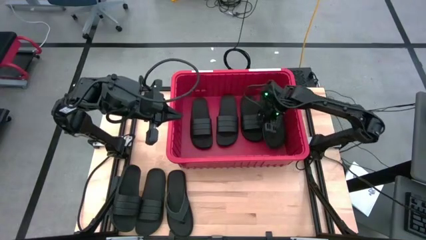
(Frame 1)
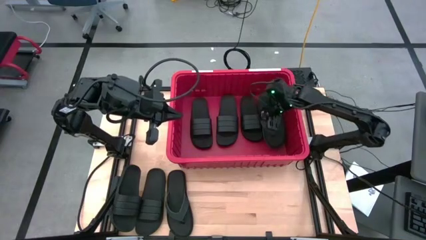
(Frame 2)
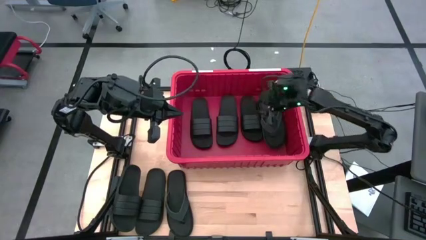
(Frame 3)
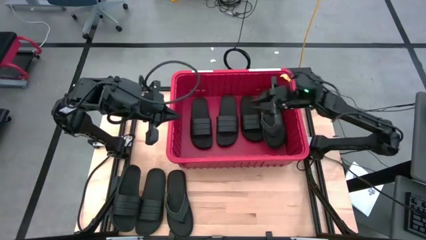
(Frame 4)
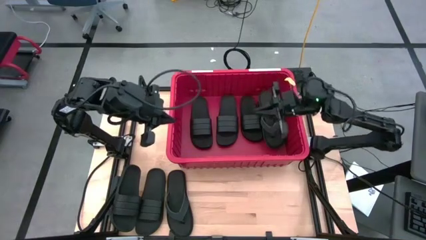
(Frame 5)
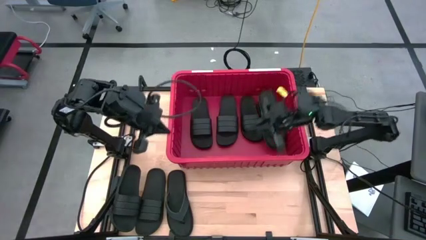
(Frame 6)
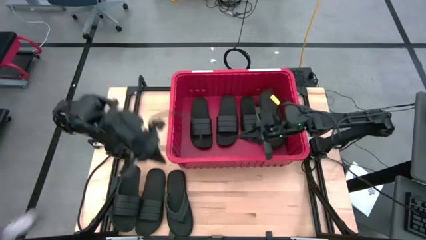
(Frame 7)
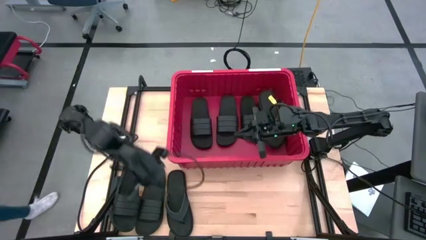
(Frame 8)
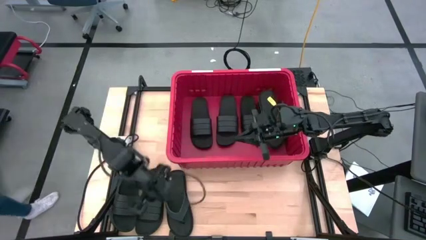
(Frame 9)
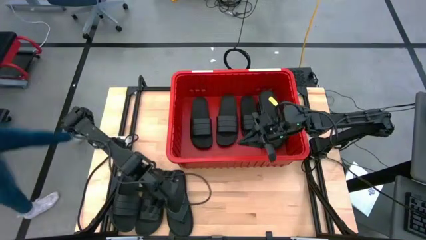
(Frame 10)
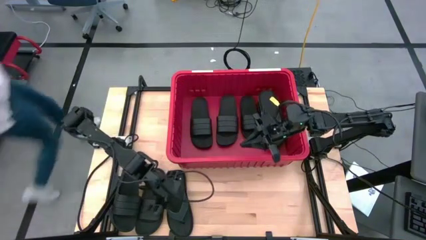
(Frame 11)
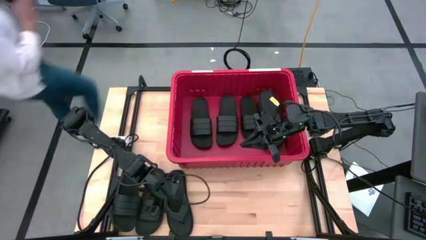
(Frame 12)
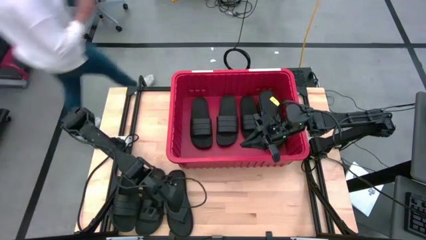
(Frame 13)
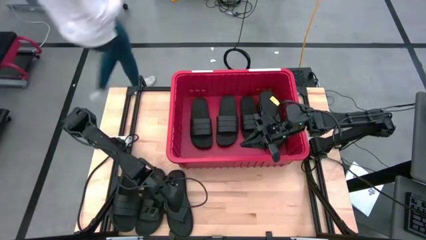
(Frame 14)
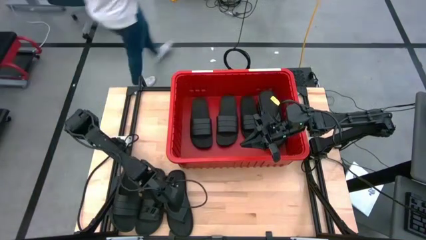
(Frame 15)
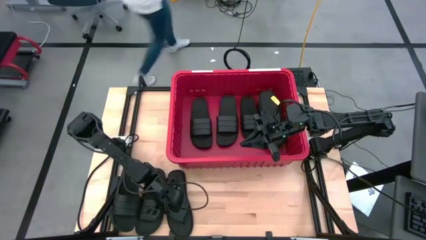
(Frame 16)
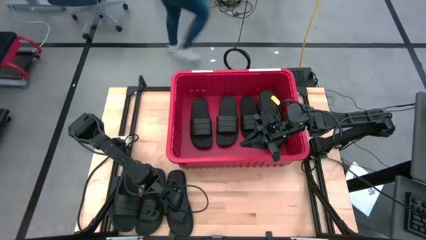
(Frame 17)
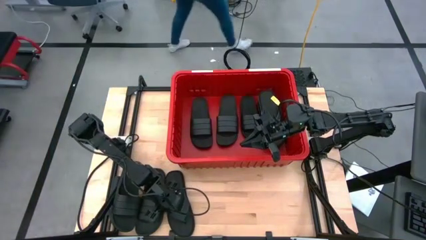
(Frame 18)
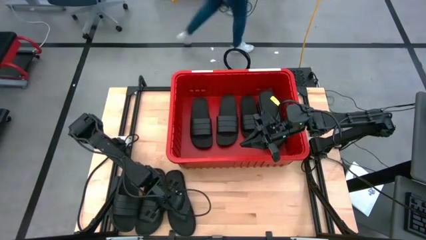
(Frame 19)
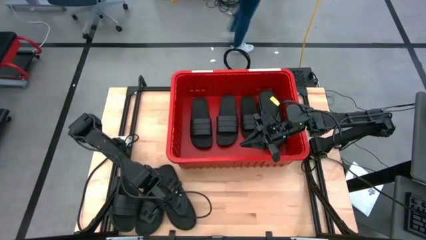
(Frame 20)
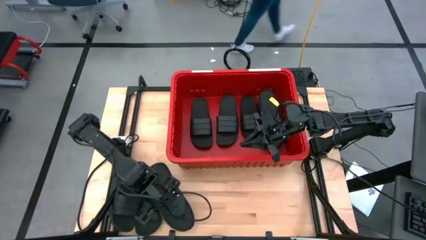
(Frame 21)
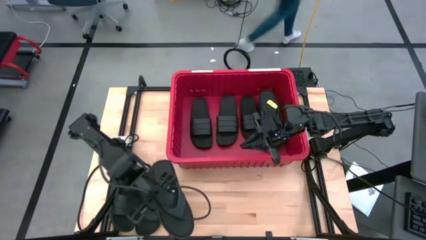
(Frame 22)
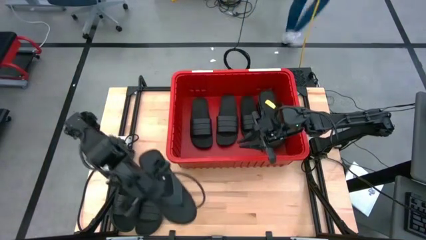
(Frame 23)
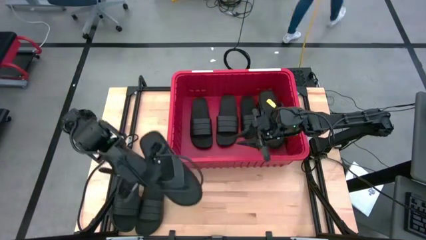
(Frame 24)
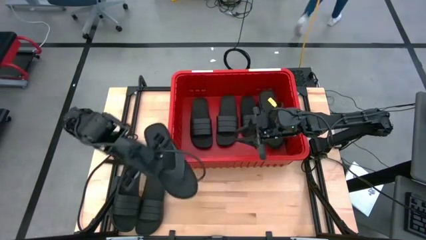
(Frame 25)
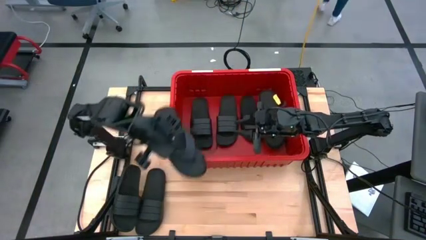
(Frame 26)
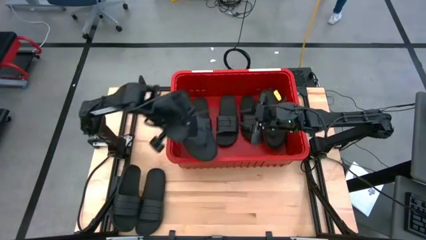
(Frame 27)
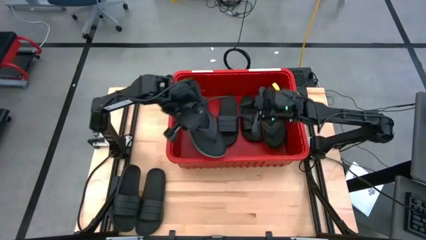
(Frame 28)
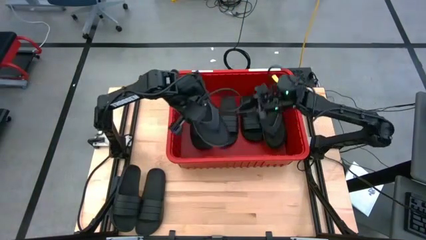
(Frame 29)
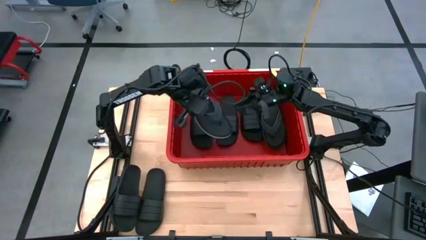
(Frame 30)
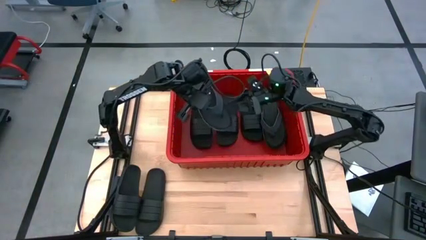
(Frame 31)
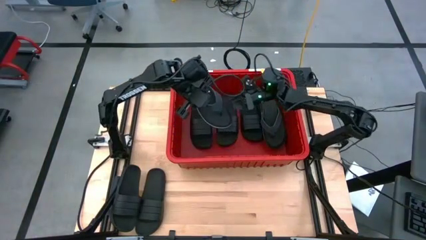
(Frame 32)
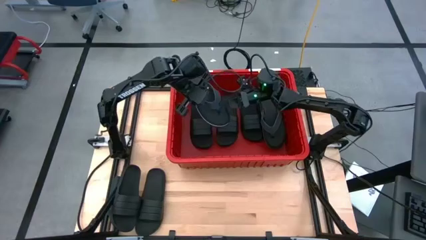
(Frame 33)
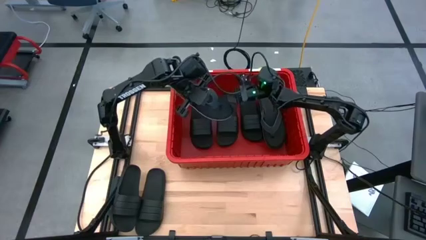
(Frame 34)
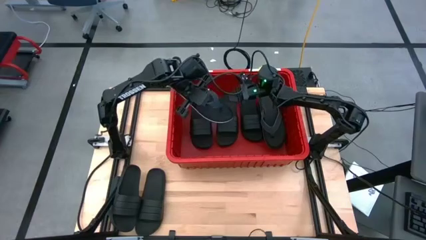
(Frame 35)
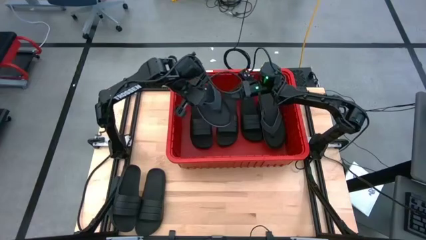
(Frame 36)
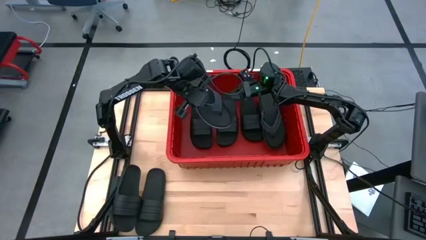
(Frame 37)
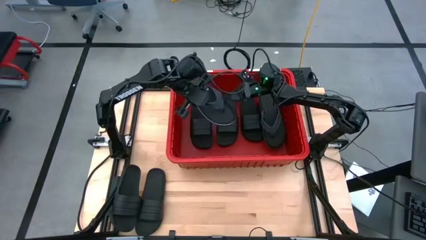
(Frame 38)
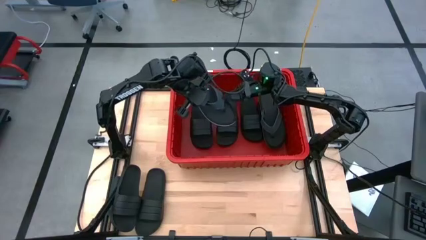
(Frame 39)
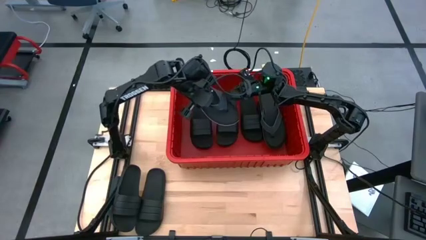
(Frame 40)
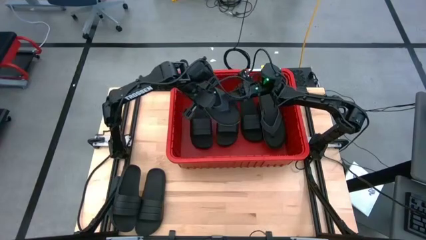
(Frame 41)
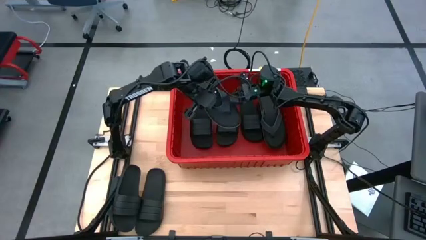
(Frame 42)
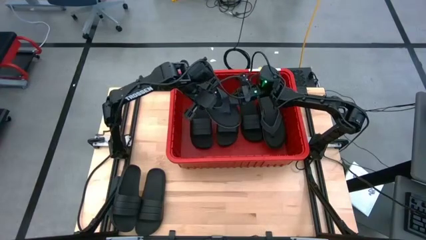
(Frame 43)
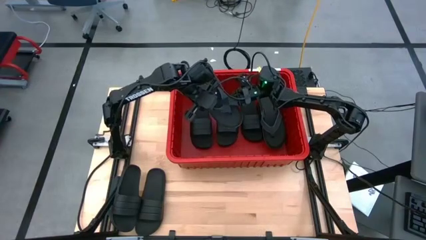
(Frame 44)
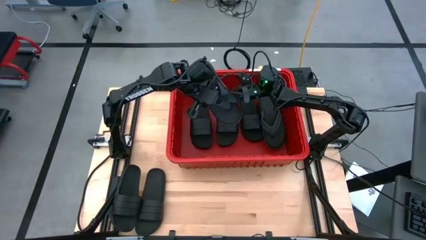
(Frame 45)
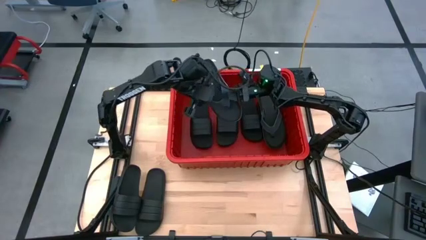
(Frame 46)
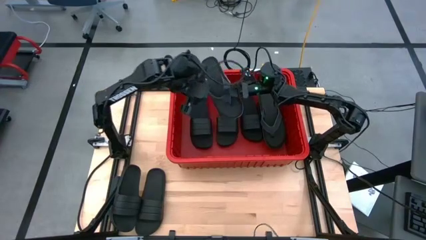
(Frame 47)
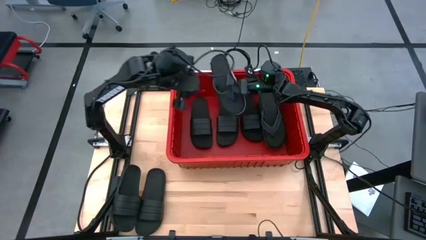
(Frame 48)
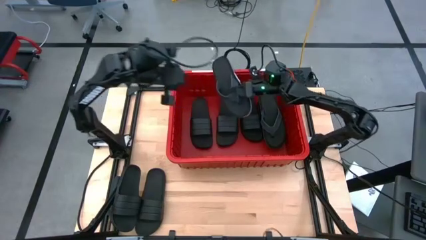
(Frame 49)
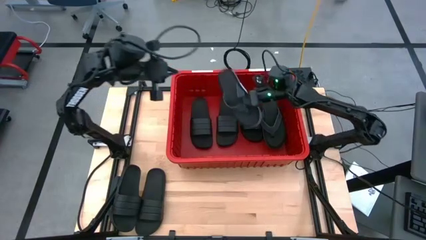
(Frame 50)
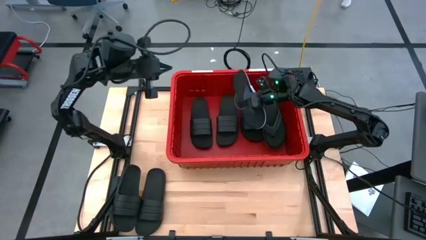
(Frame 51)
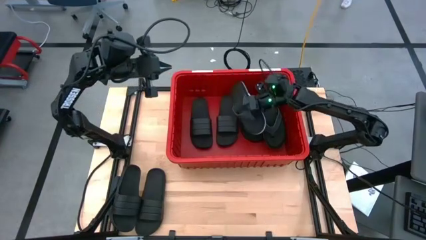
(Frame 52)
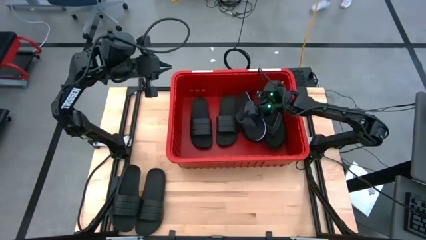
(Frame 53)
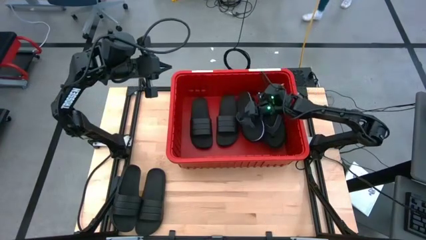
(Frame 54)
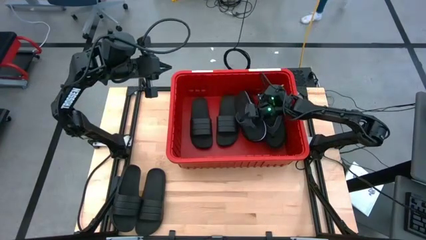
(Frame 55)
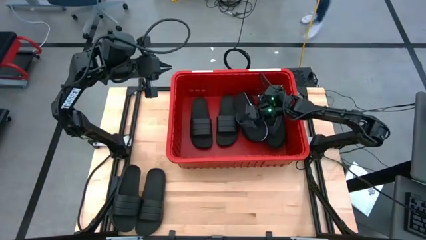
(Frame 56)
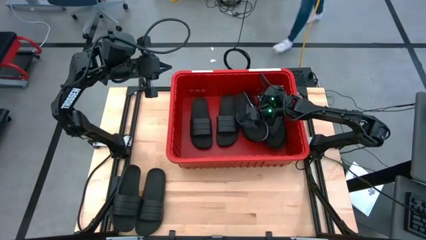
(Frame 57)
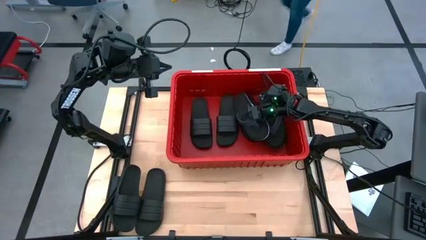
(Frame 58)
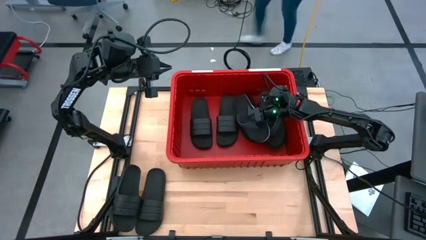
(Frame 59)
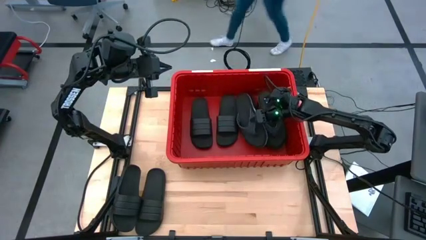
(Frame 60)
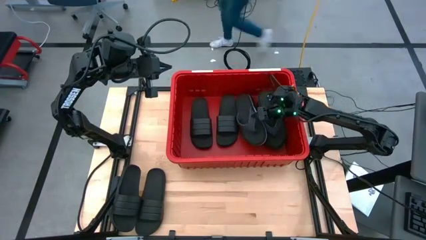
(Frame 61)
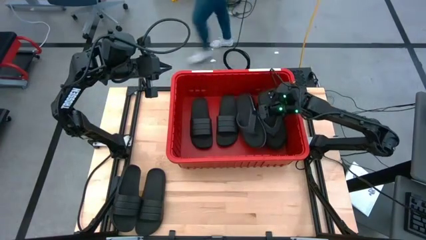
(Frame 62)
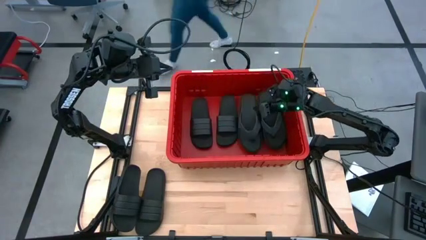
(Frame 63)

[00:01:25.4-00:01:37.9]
Task: Pick and place slides into bin
Stack the black slipper on top of the black slipper

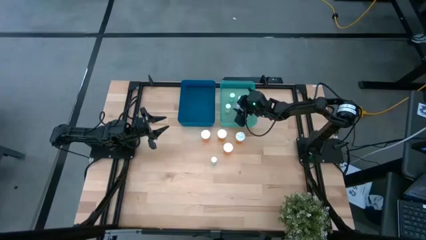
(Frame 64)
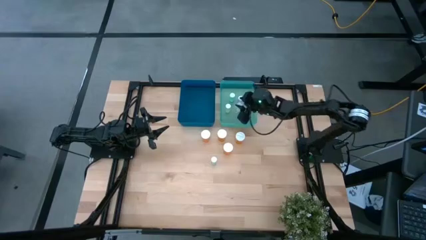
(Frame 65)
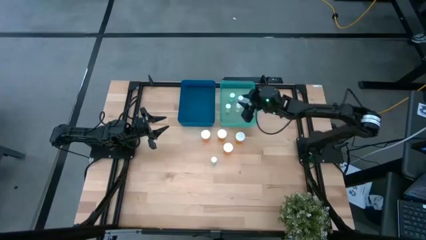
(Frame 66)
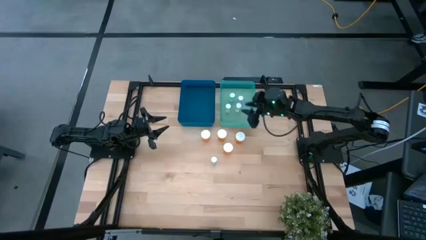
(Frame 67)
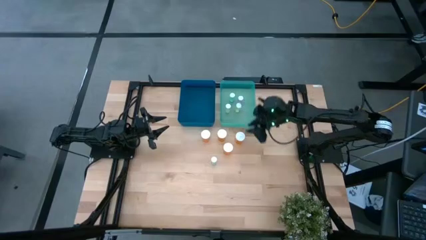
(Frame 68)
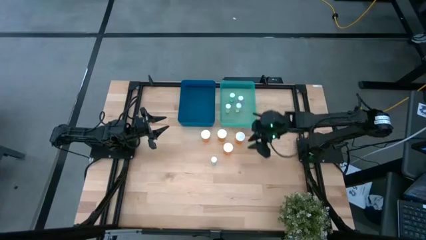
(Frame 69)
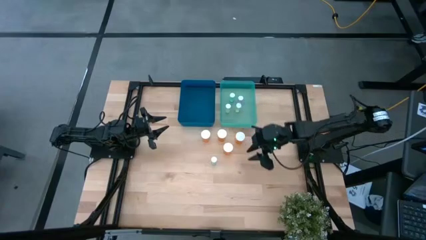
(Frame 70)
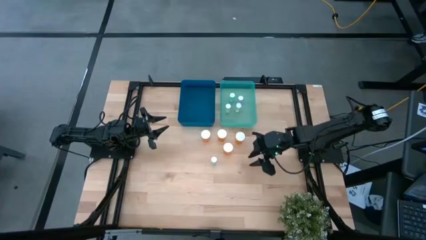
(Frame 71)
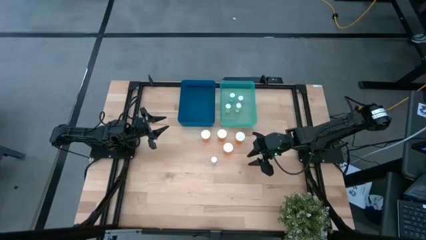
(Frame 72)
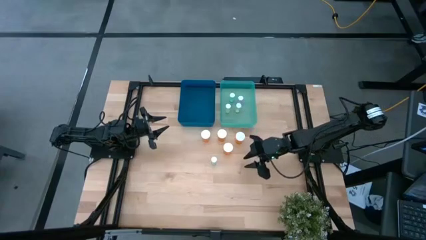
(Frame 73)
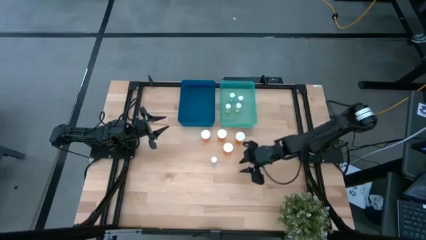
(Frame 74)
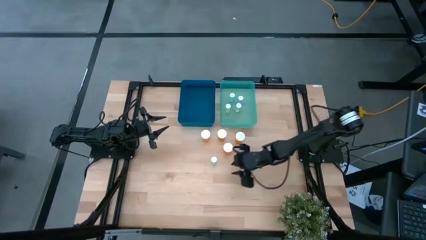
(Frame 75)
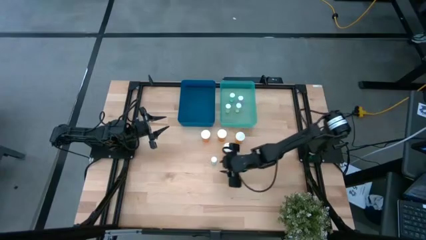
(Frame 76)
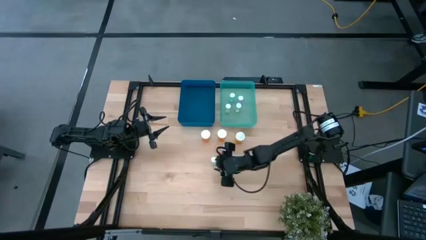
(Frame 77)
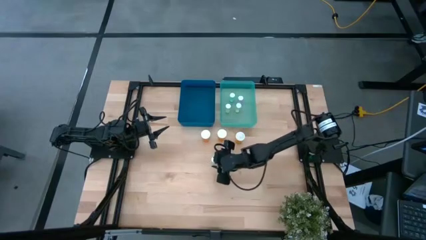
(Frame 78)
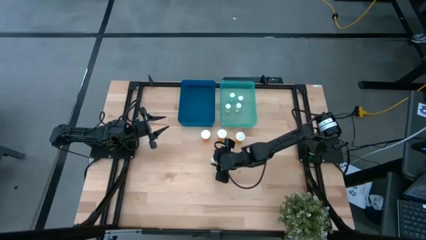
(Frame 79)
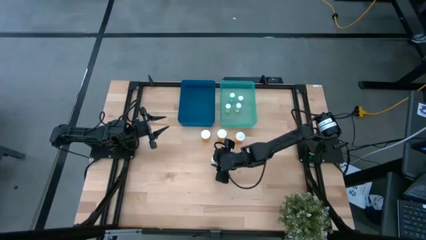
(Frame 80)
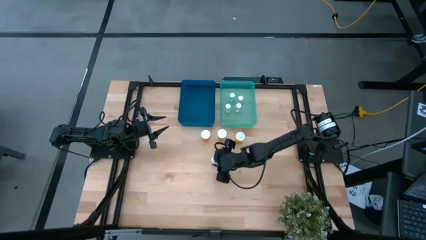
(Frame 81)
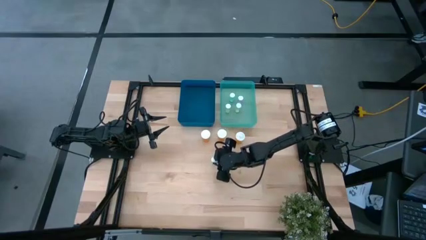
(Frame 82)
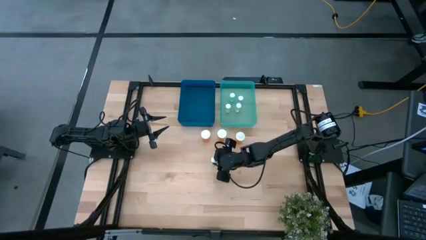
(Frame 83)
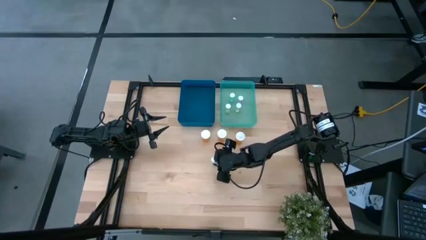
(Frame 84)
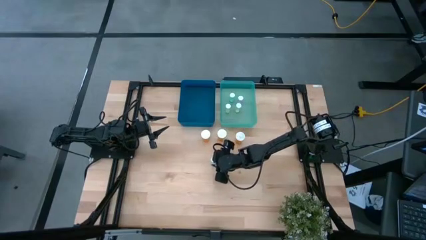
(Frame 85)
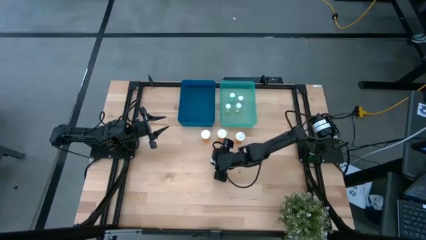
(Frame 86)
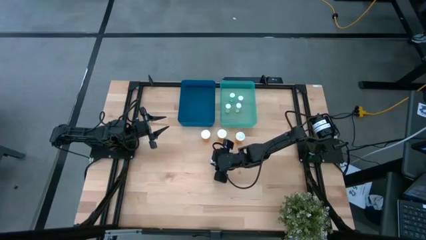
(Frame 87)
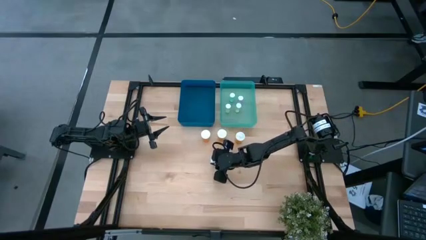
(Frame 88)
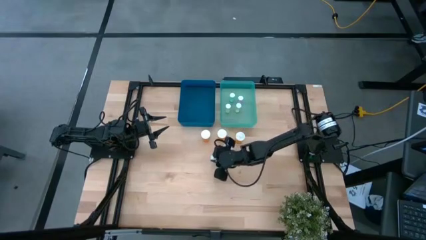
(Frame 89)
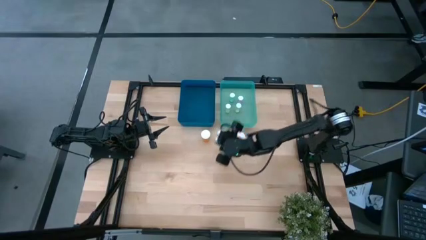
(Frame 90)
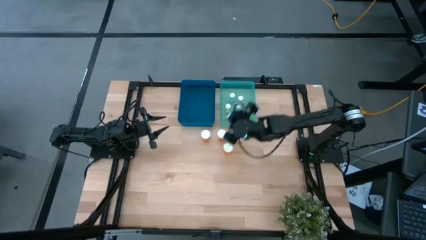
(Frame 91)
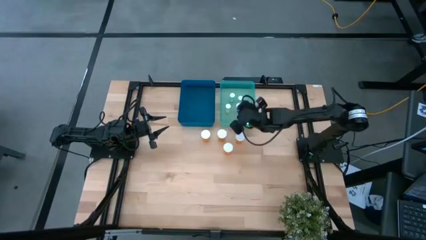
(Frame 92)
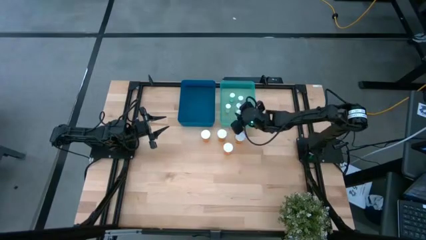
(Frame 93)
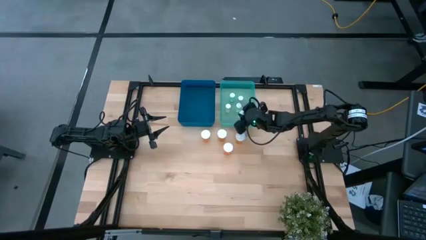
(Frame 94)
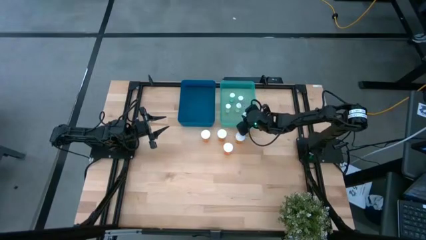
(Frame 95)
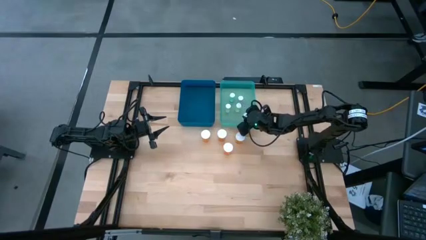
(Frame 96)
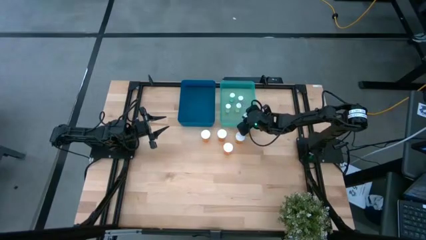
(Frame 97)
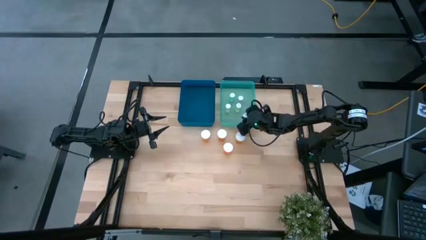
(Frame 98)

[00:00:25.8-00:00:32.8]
Task: Pick and place medicine bottles into bin by pill shape (circle, oval)
Put the blue tablet bottle into the light blue bin
